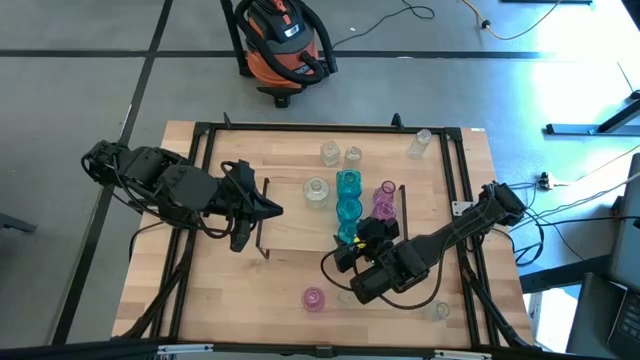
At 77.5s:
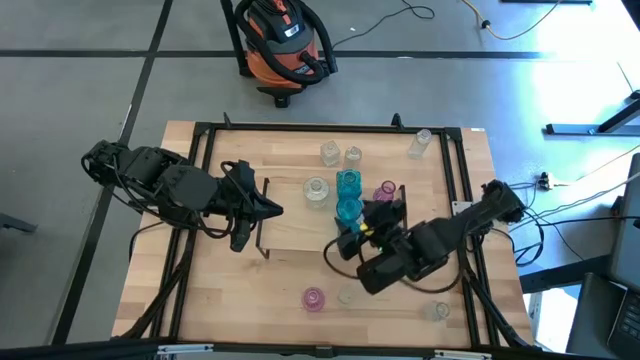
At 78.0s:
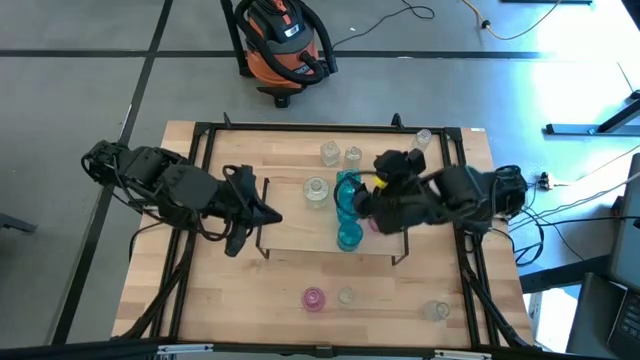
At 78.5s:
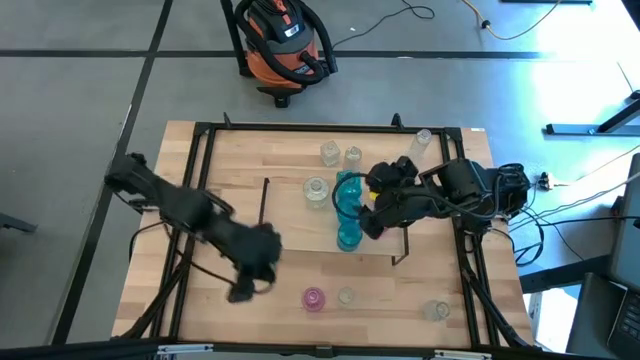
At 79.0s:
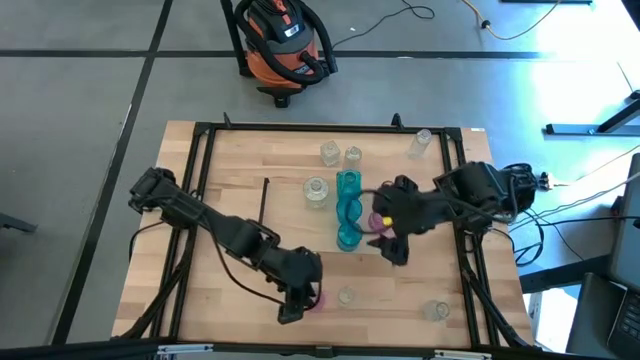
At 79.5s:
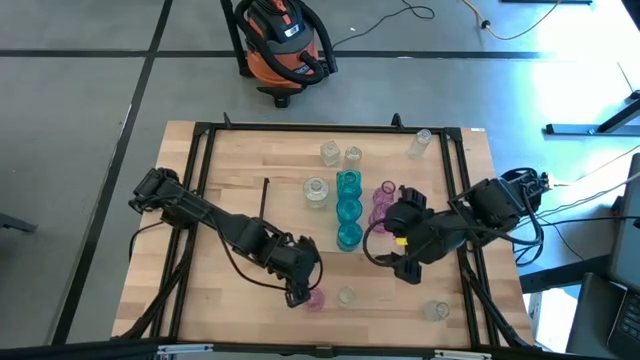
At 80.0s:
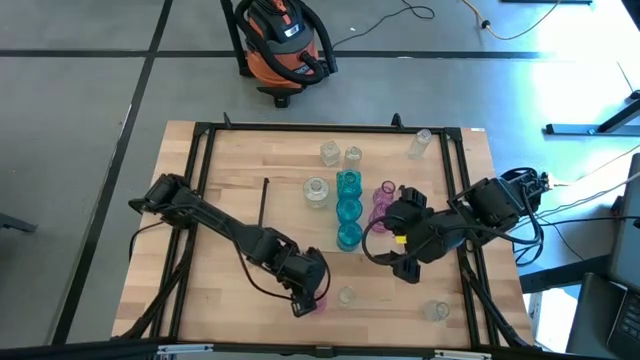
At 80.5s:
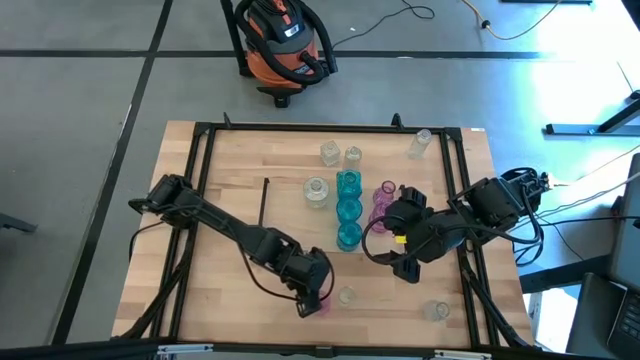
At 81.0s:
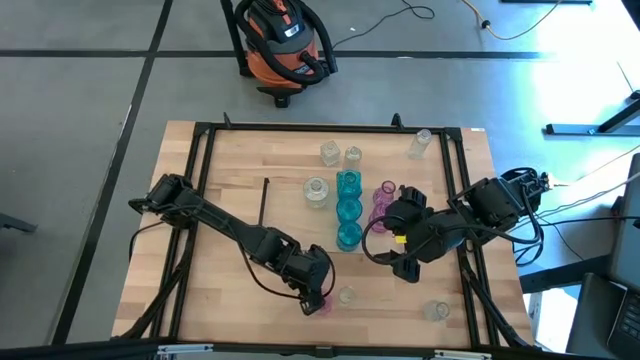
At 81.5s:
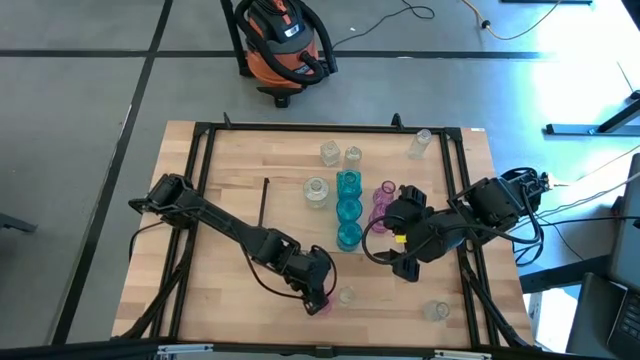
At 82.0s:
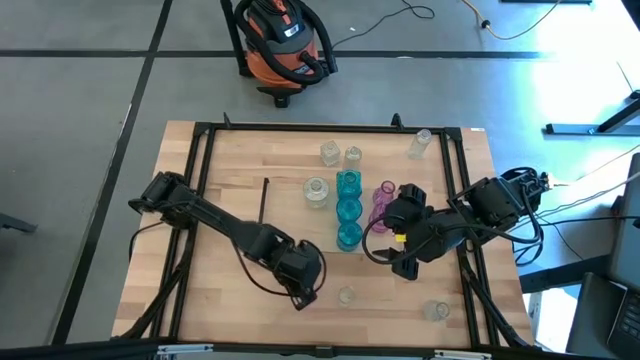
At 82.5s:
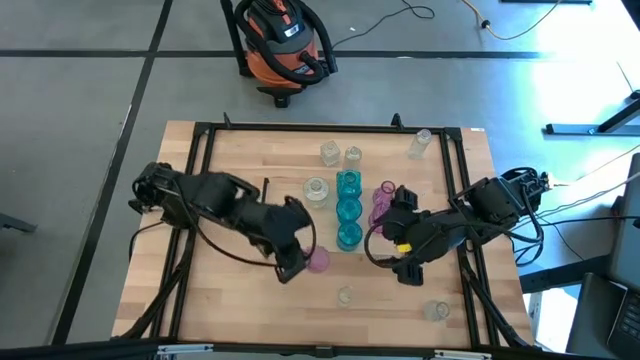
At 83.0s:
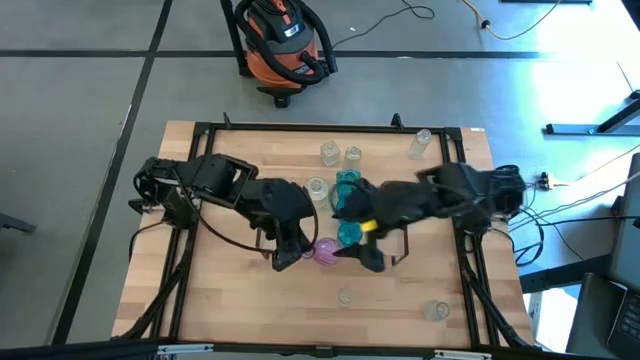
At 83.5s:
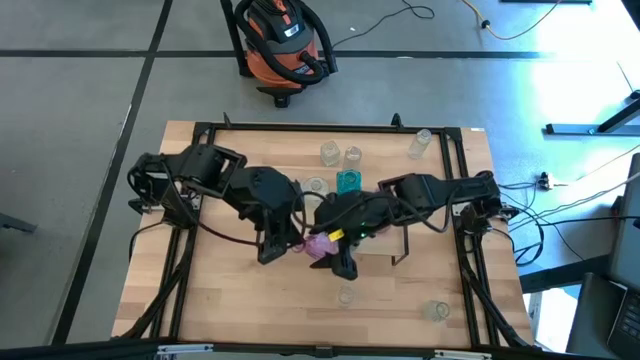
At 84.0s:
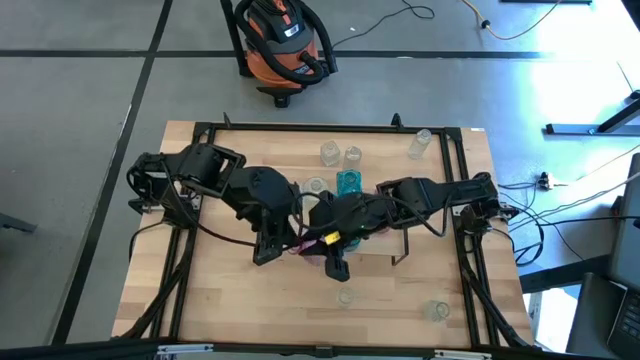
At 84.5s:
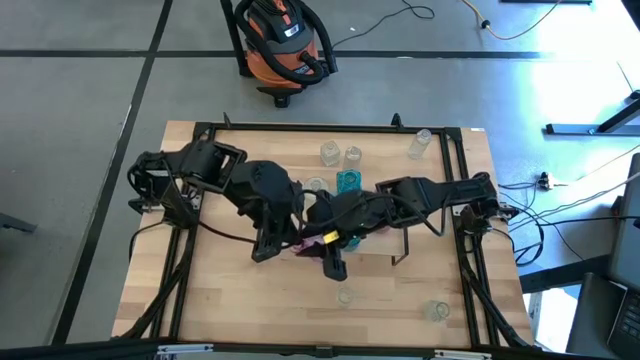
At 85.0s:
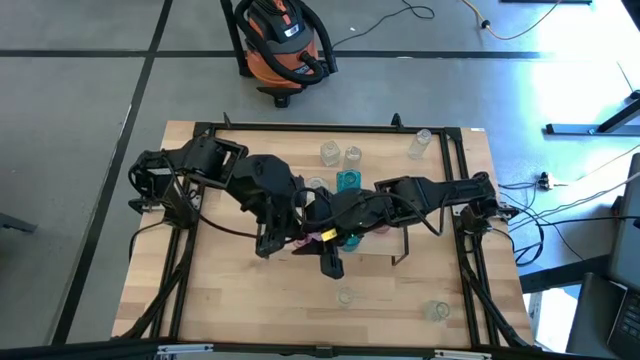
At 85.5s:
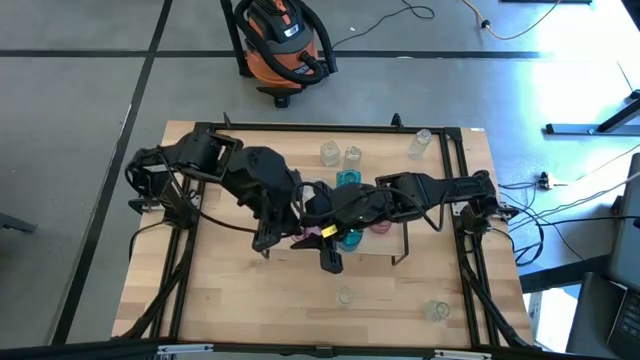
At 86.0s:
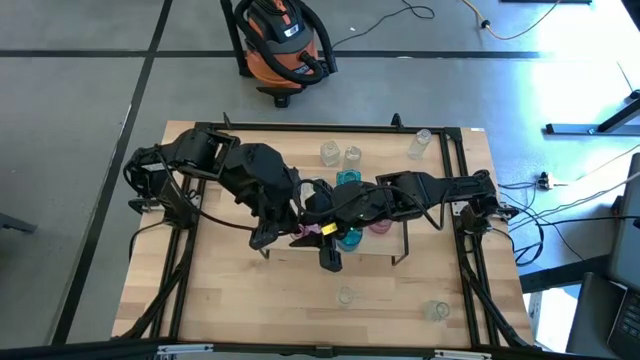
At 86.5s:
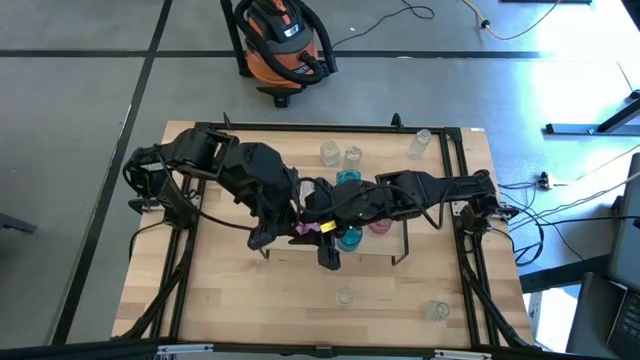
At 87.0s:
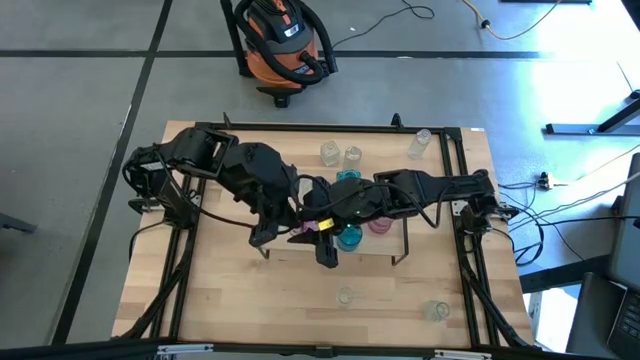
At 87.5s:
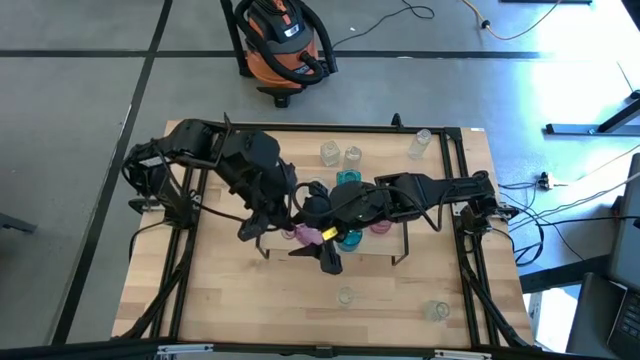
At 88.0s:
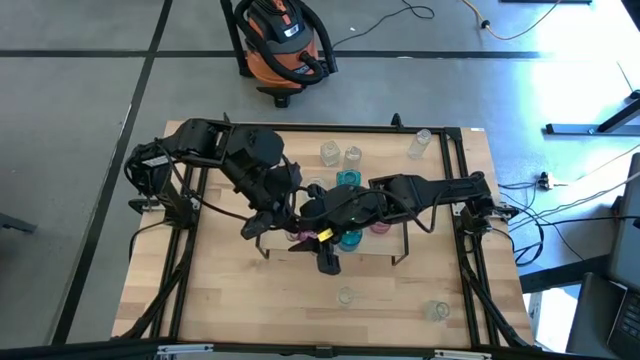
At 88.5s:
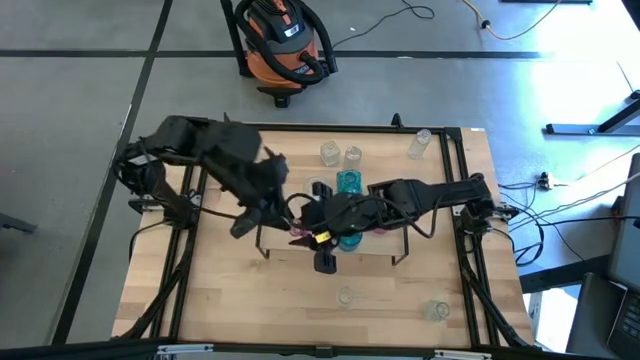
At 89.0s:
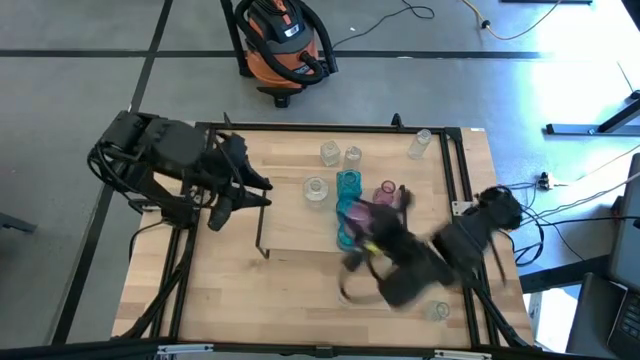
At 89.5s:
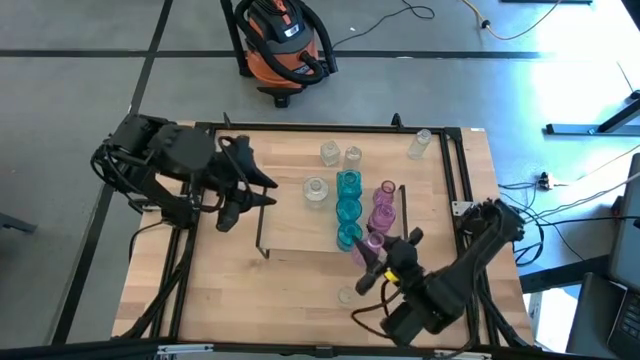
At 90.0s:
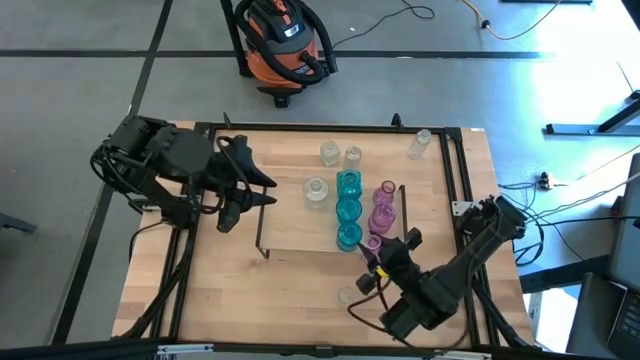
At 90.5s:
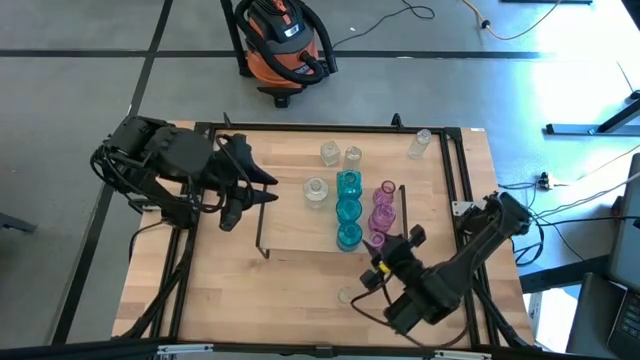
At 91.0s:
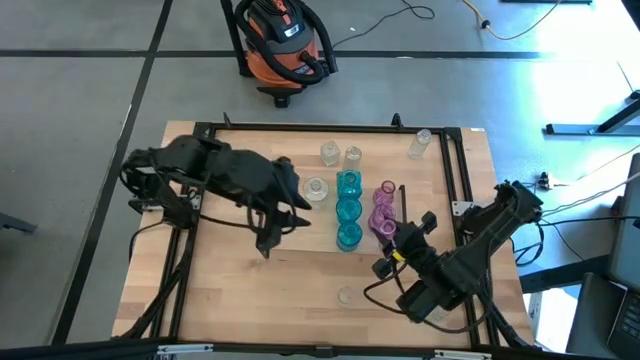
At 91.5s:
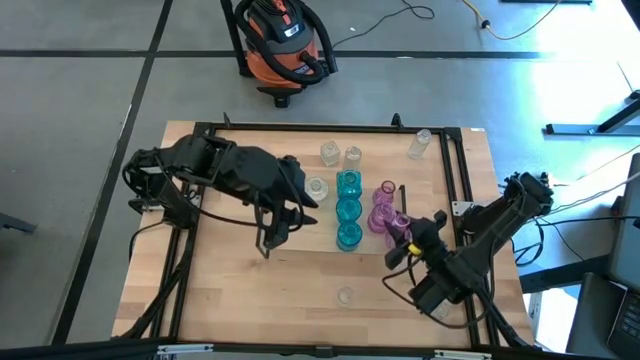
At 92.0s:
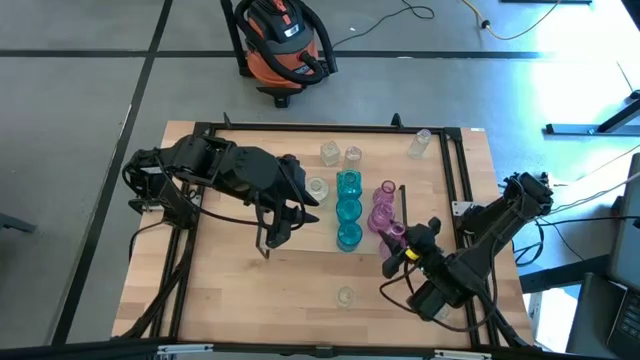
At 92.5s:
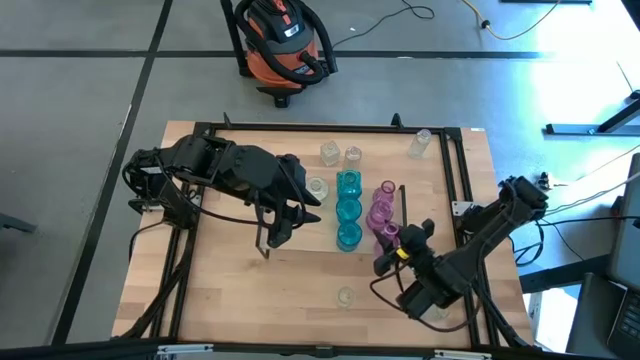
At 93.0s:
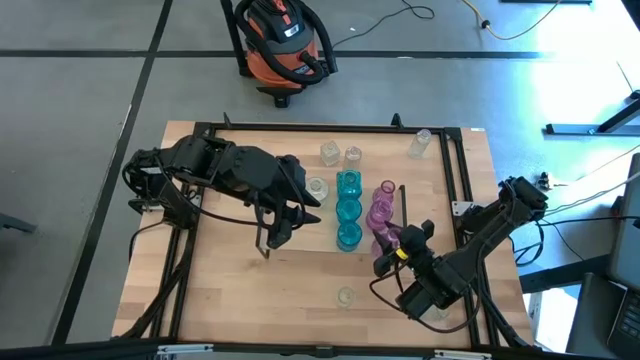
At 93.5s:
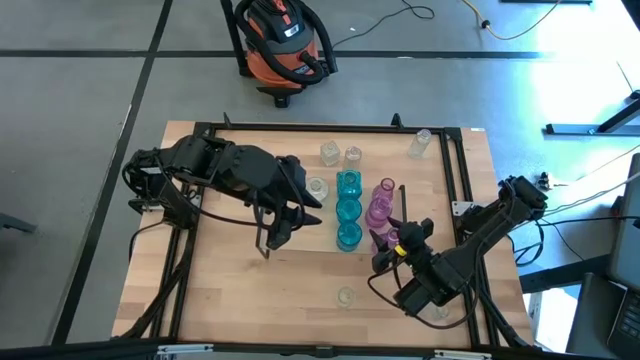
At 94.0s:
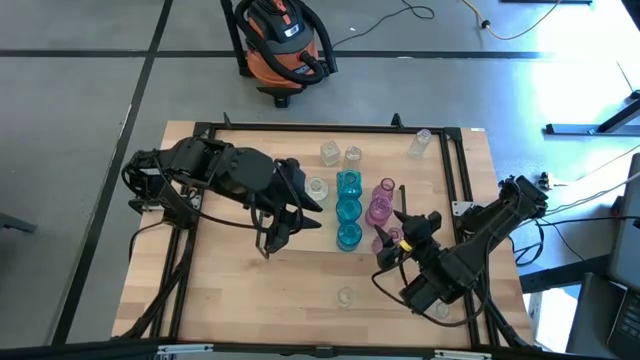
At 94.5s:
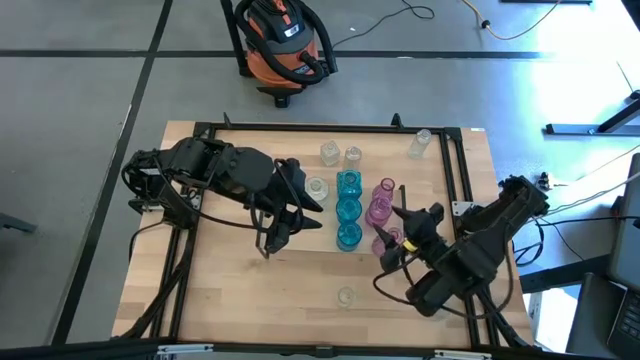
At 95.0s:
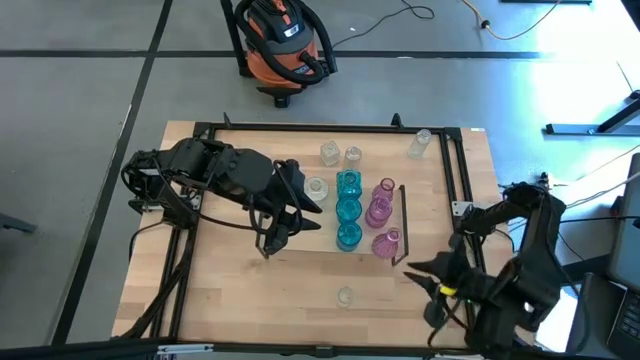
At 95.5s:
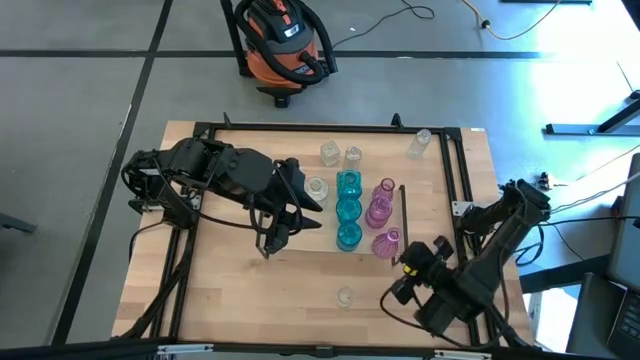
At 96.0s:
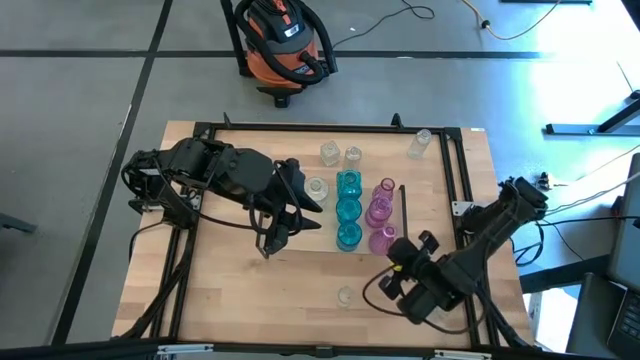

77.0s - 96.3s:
Task: sort vases onto shelf
Put the pink vase on the shelf

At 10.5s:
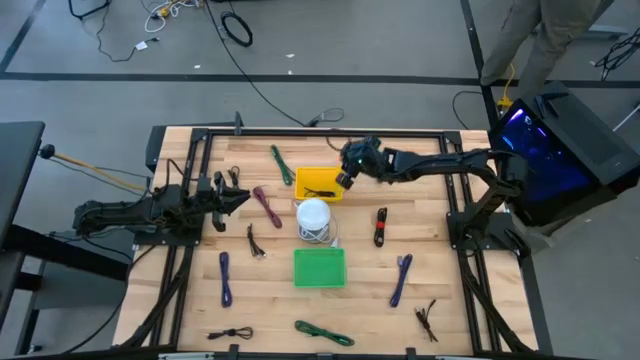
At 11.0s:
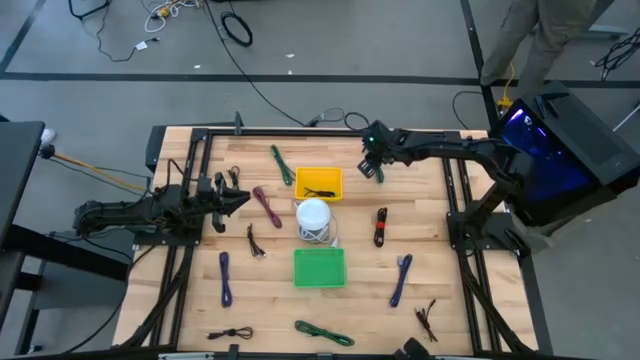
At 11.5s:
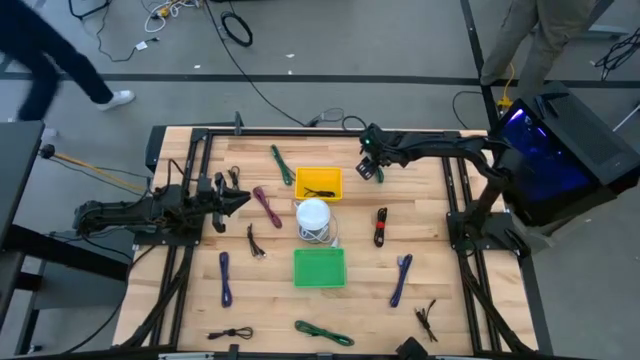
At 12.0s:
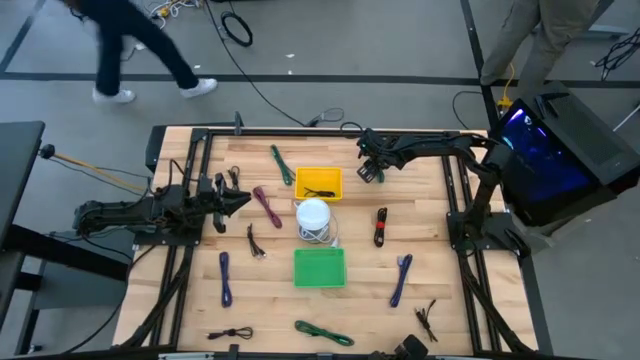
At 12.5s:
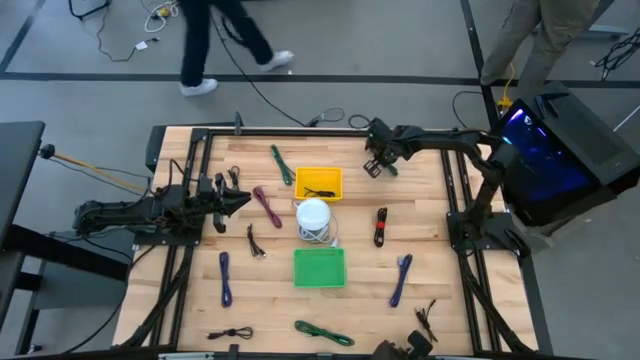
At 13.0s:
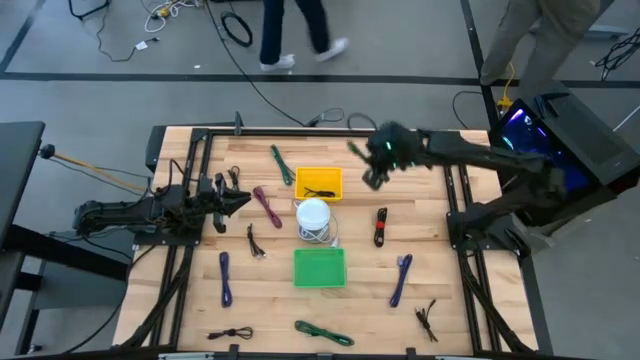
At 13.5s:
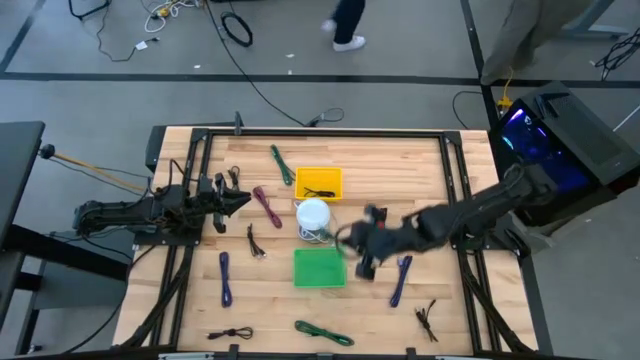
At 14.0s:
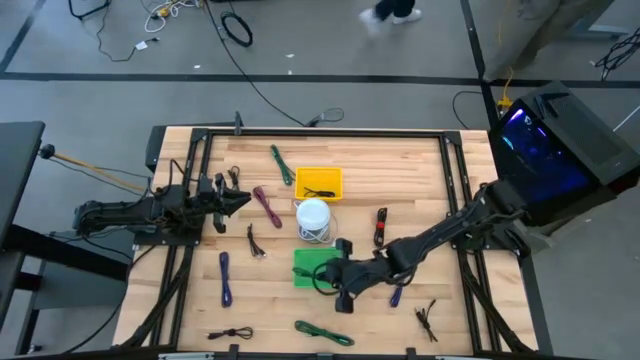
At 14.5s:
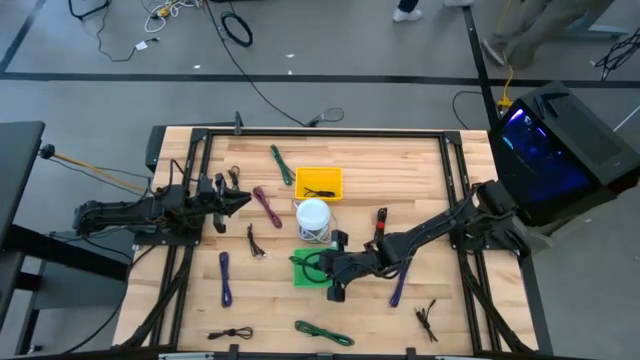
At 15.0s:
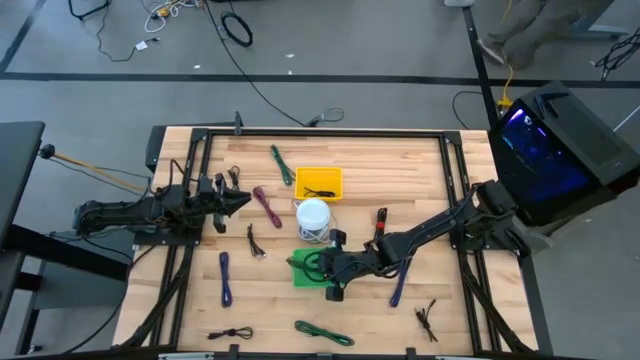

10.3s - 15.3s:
Task: Pick & Place USB Port
Put the top right green and black USB cable into the green bin
